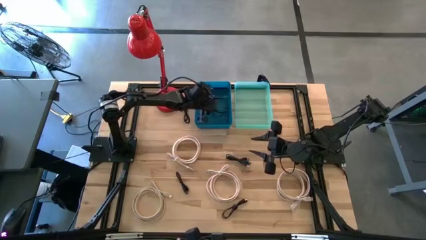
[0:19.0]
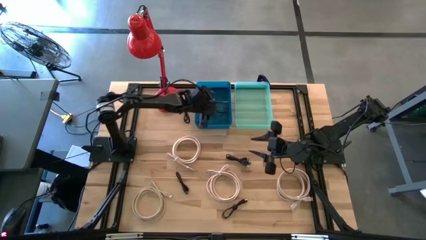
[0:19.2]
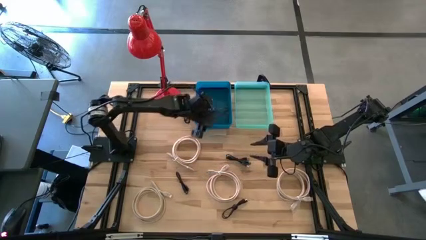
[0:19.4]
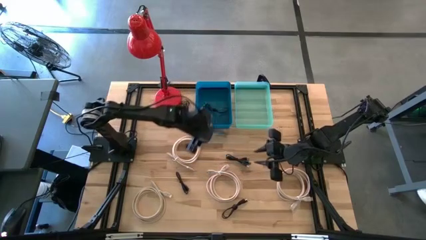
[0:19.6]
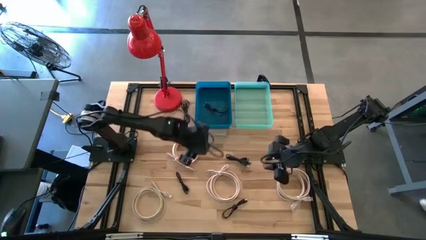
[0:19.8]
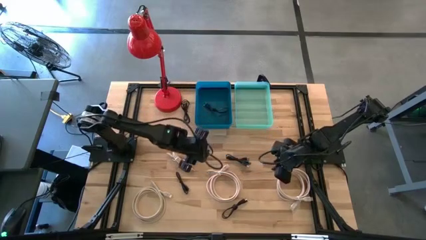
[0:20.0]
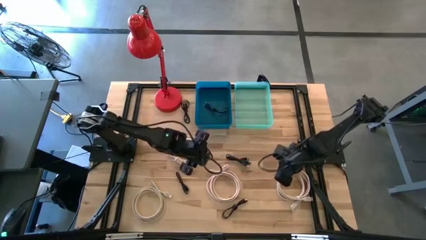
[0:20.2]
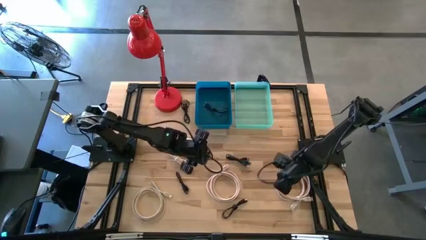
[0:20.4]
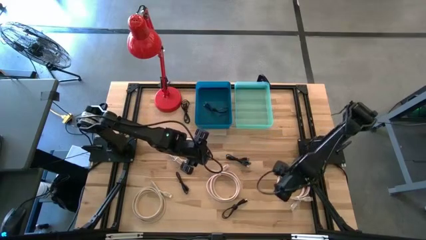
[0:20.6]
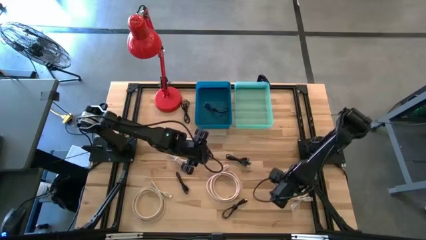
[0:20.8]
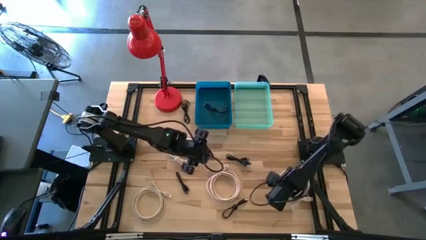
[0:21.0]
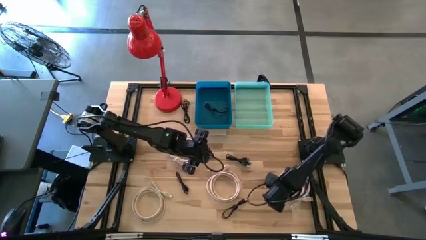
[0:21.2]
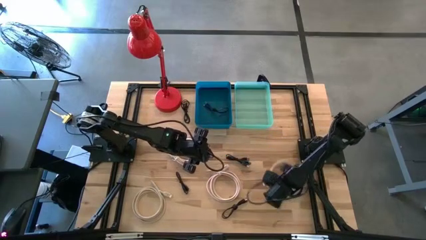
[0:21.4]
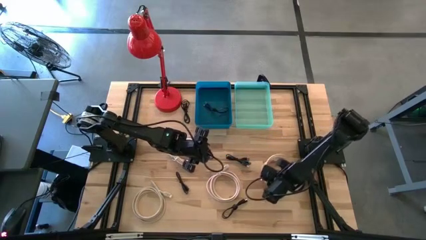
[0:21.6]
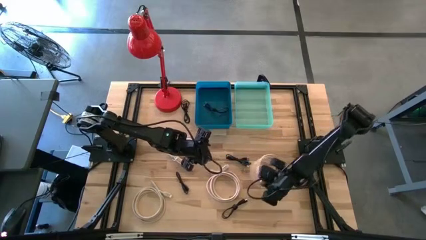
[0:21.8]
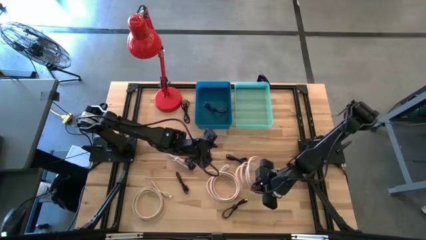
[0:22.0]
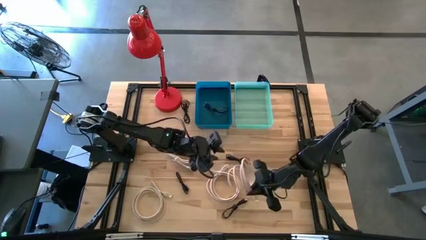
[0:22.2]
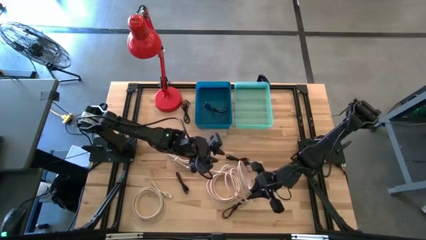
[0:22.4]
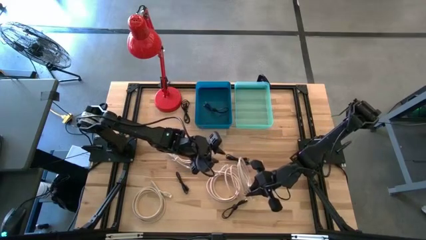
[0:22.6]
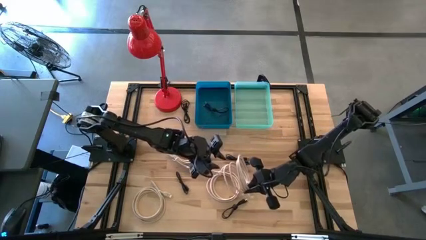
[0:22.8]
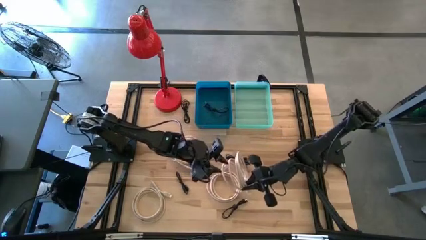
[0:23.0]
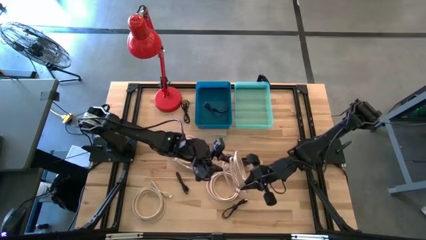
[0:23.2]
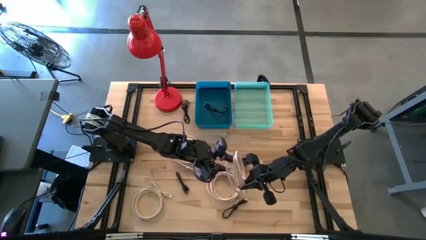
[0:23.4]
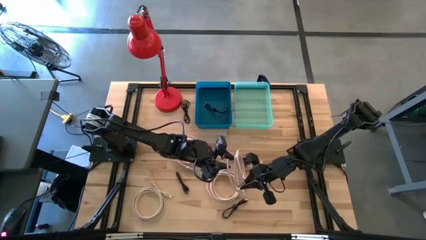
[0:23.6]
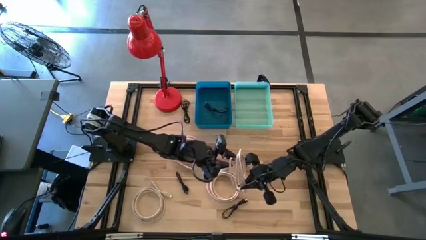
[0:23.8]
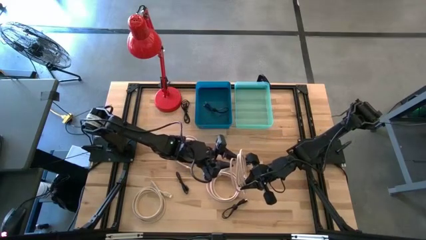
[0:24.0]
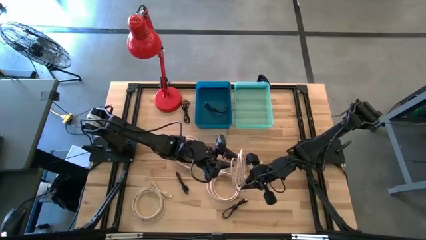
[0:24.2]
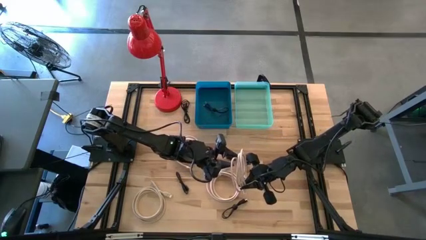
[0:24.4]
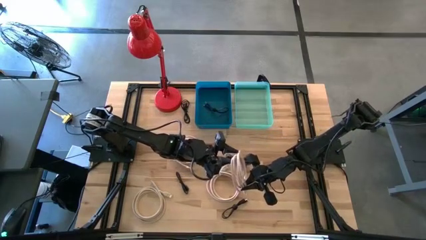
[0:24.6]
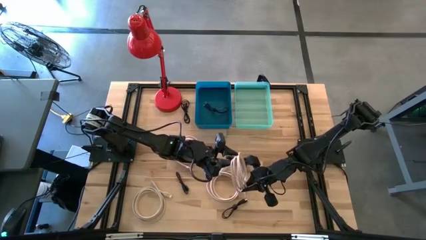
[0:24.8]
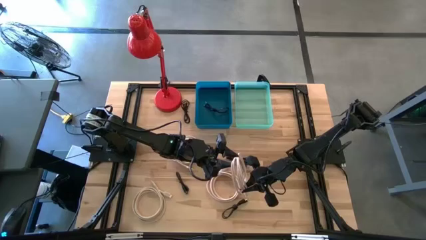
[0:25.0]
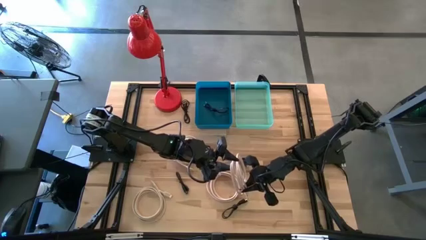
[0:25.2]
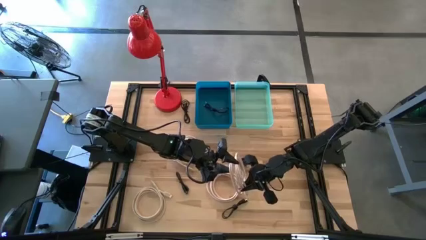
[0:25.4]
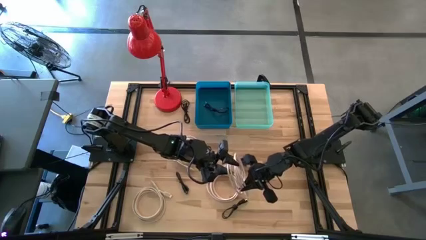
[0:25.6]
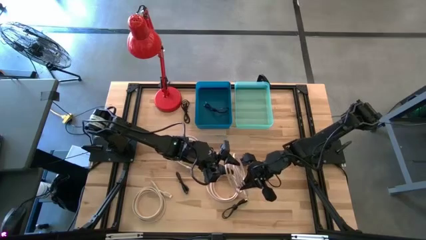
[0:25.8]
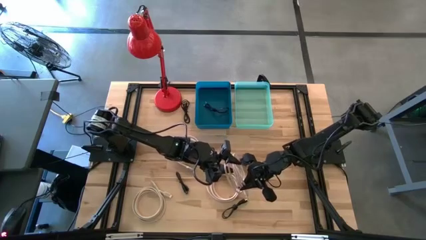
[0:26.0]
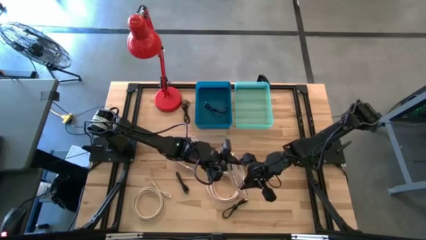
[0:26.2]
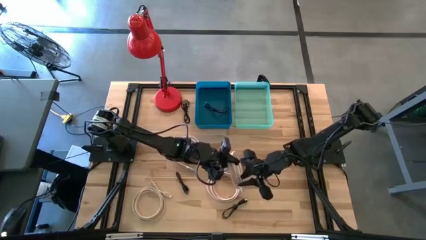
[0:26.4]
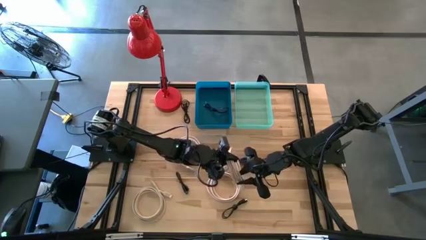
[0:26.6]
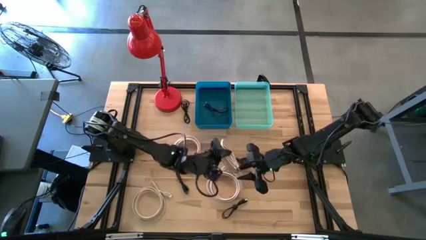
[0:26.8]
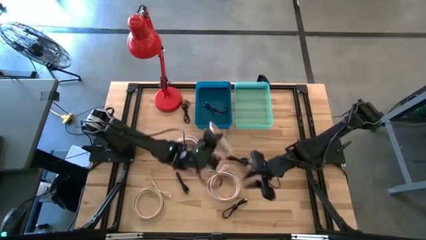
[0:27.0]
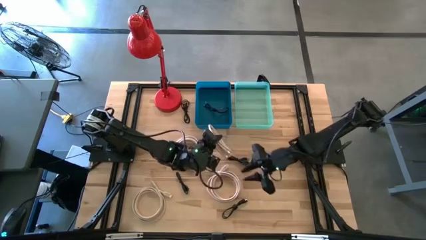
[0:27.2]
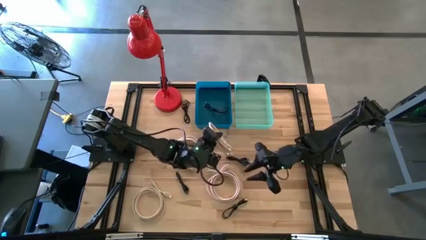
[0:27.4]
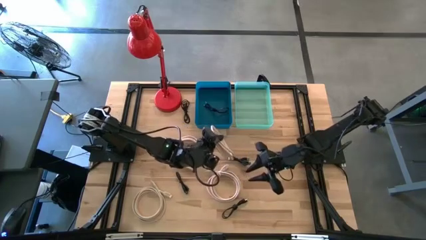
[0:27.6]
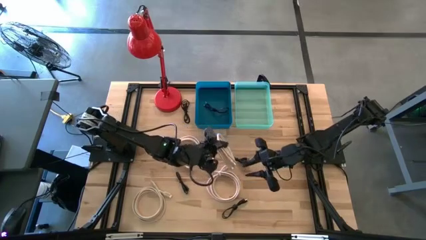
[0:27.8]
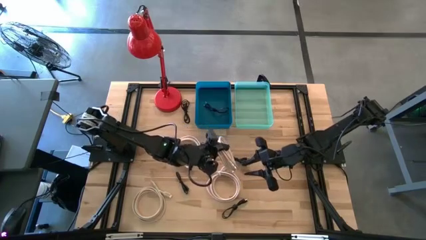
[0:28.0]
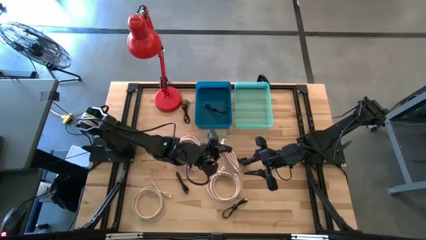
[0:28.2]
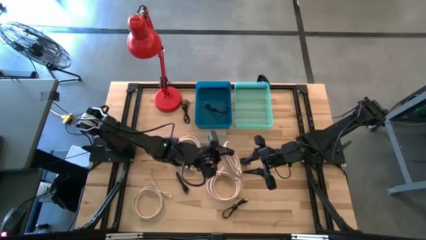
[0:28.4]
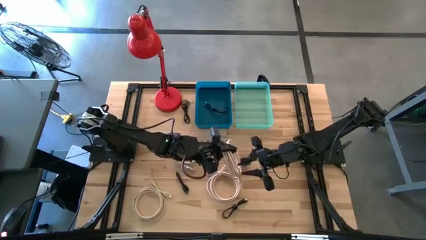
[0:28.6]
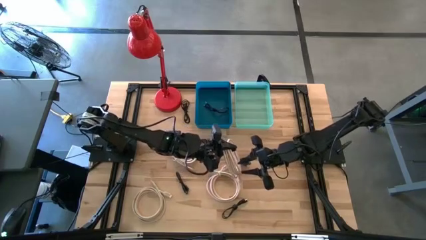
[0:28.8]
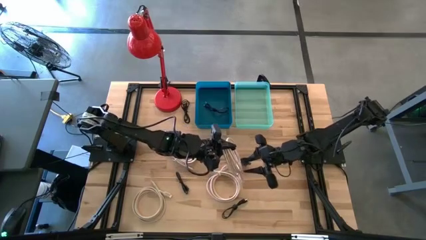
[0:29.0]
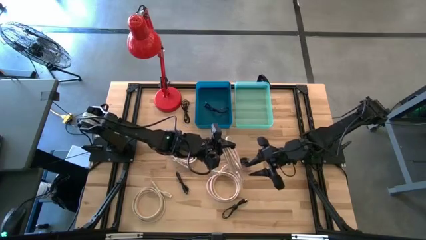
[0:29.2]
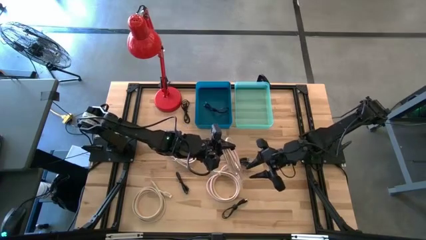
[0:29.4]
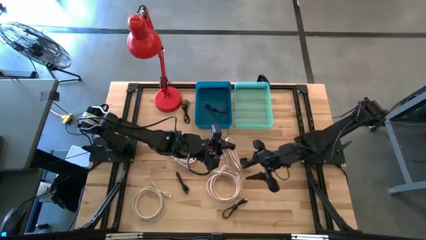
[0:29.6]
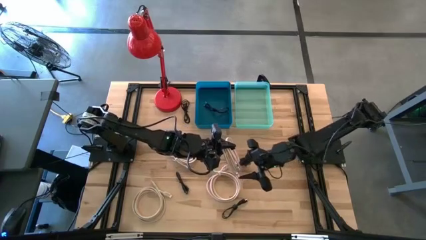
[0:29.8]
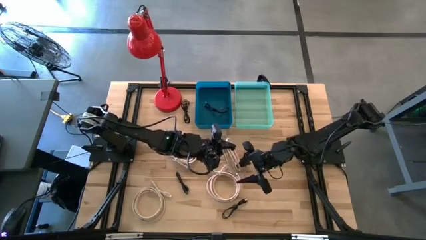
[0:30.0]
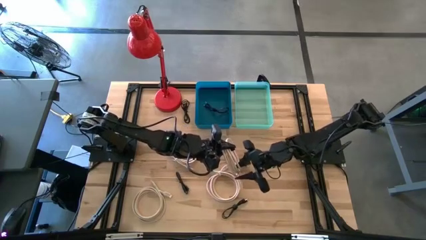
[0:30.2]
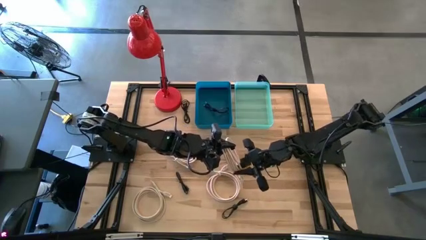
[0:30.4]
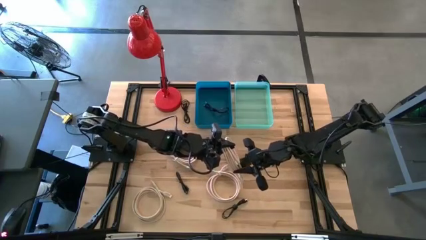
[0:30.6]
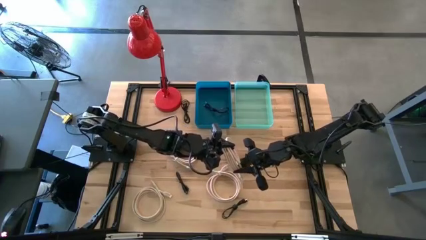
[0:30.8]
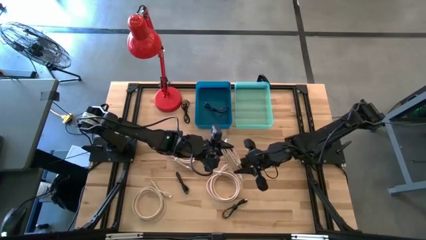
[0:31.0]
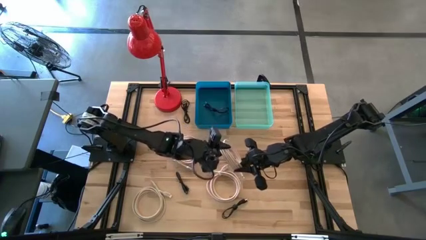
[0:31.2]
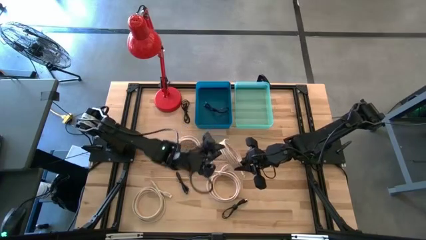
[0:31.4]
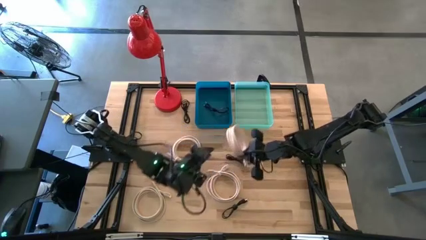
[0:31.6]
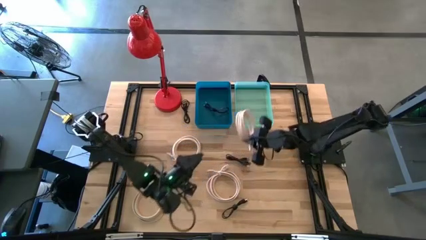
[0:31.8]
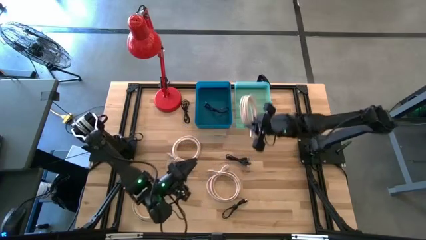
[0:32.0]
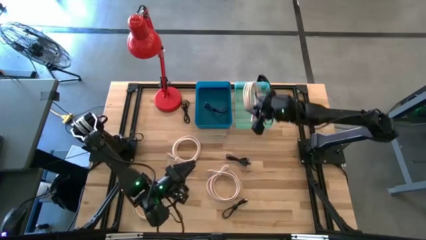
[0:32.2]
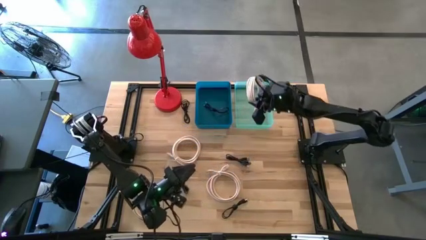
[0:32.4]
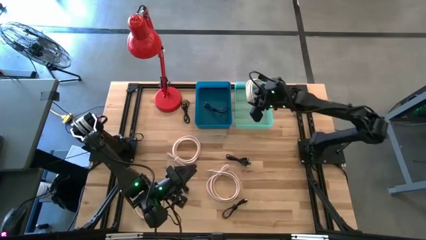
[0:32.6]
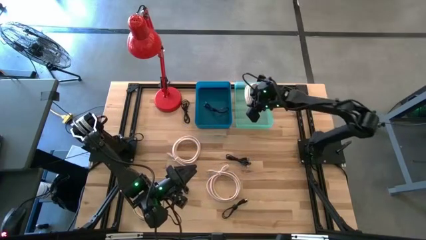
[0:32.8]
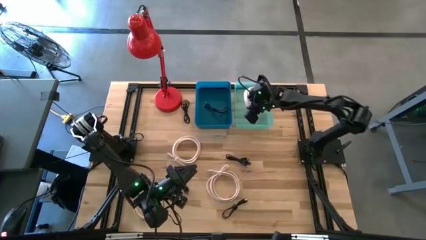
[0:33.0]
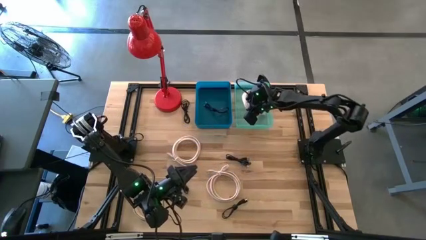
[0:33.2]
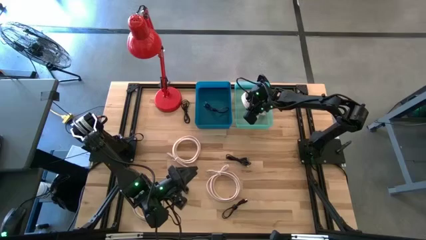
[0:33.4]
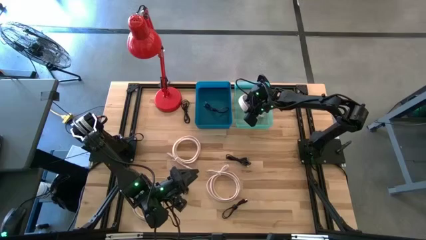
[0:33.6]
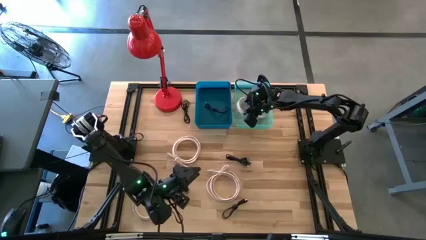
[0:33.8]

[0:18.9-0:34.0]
Task: Pick & Place USB Port
Put the brown HDMI cable into the green bin
